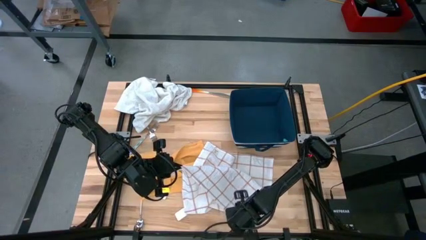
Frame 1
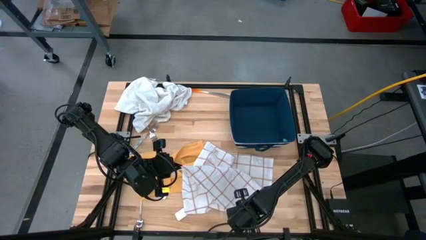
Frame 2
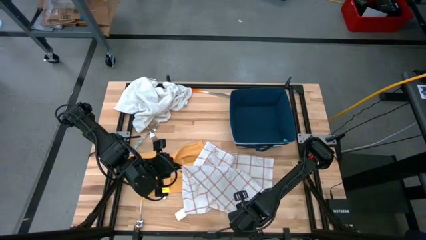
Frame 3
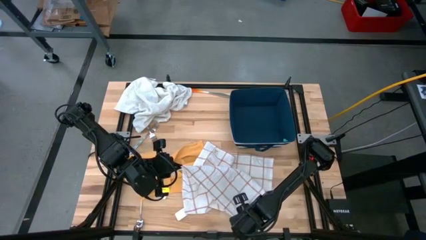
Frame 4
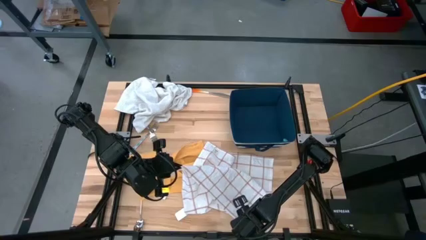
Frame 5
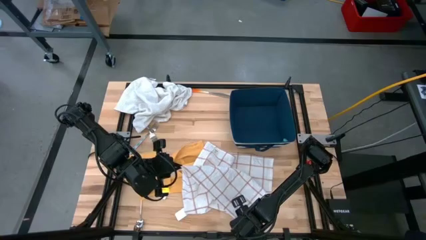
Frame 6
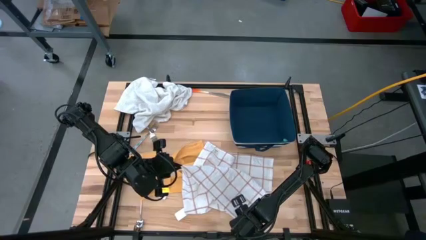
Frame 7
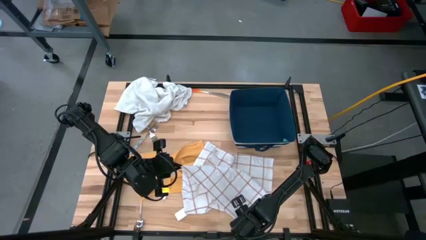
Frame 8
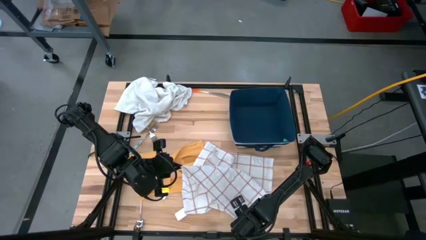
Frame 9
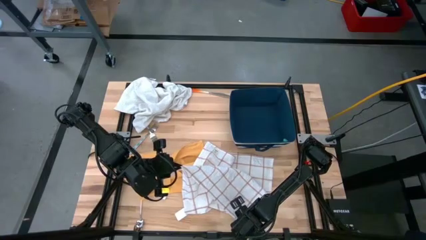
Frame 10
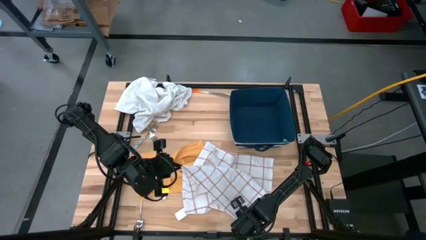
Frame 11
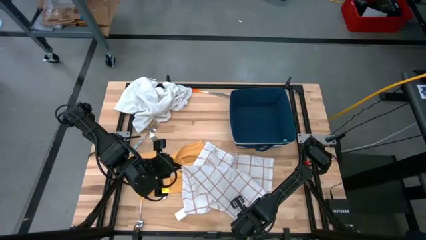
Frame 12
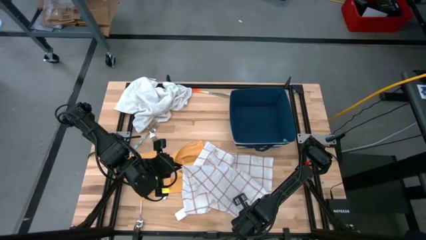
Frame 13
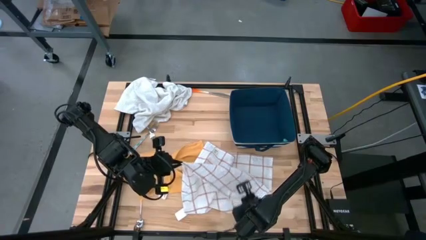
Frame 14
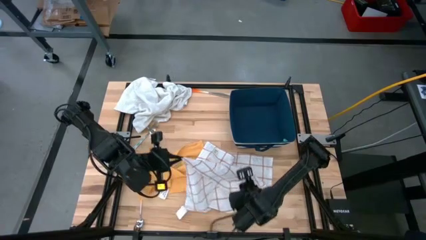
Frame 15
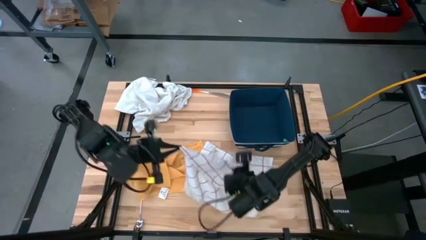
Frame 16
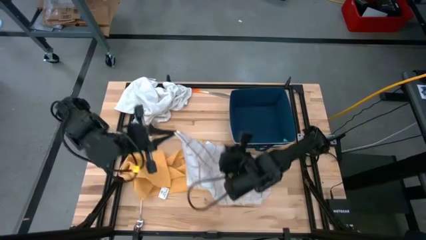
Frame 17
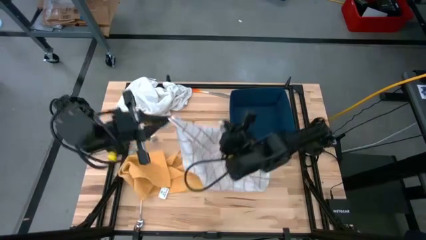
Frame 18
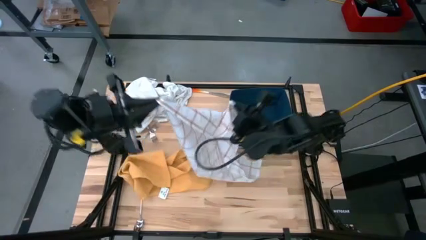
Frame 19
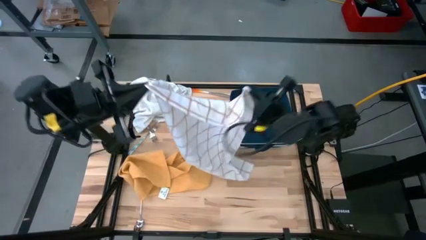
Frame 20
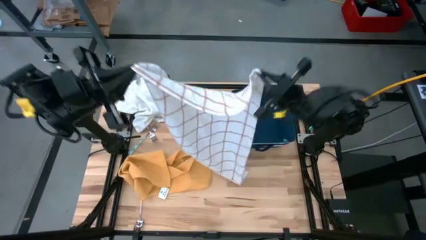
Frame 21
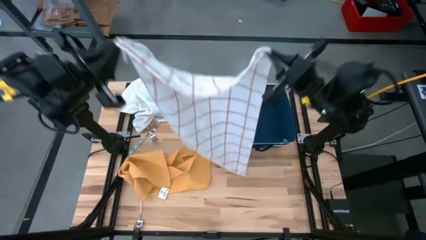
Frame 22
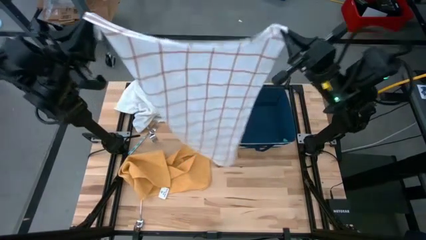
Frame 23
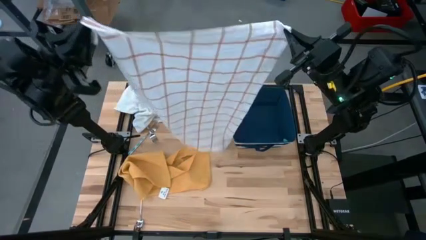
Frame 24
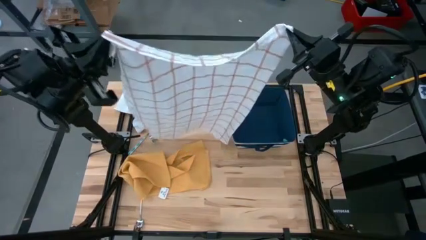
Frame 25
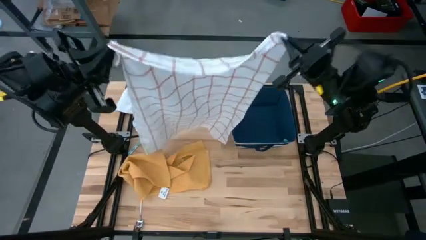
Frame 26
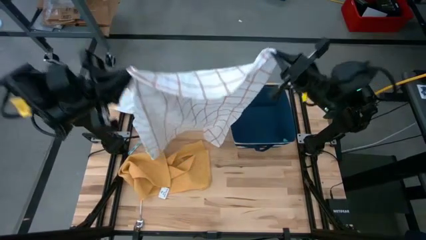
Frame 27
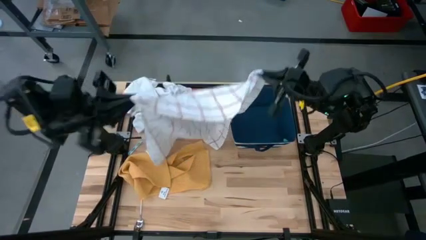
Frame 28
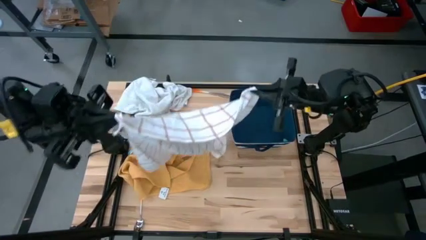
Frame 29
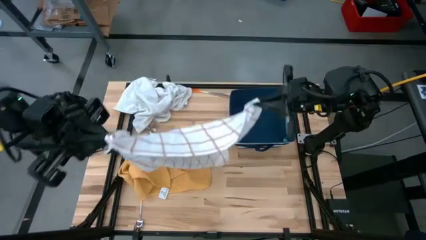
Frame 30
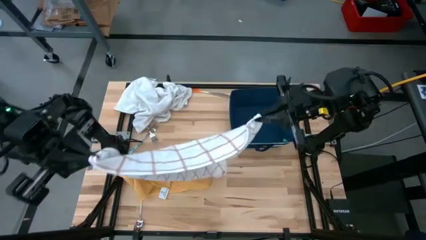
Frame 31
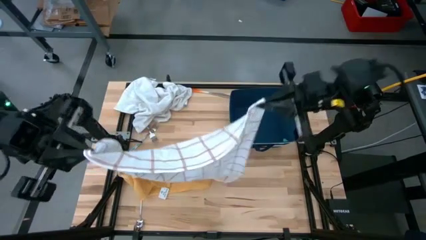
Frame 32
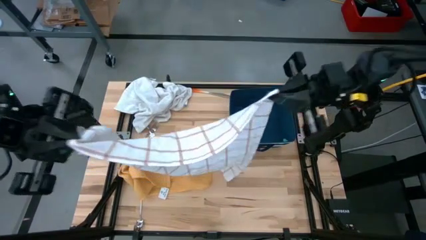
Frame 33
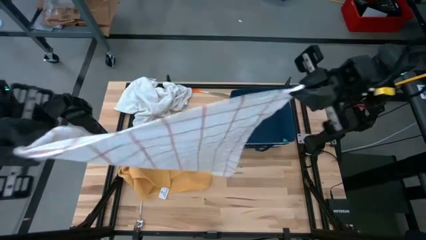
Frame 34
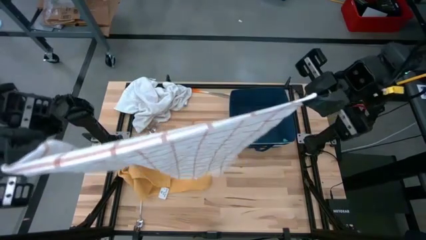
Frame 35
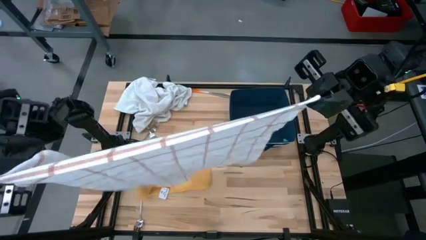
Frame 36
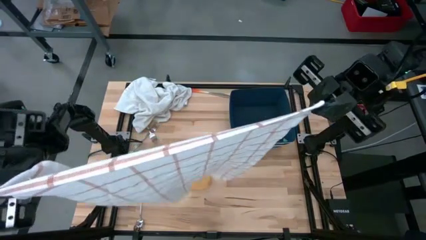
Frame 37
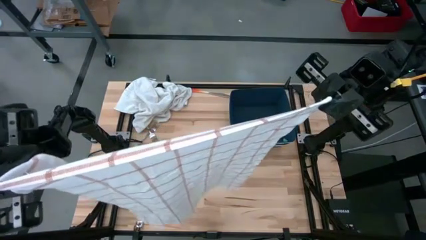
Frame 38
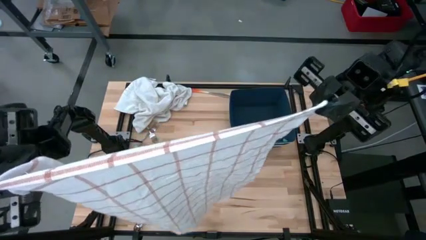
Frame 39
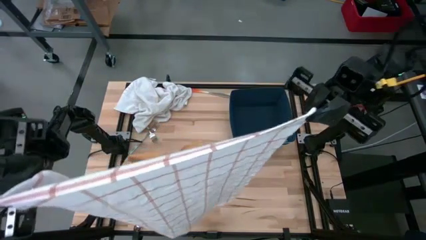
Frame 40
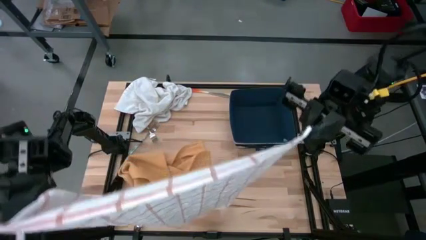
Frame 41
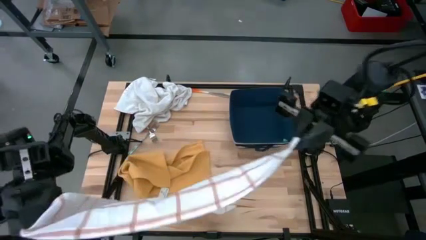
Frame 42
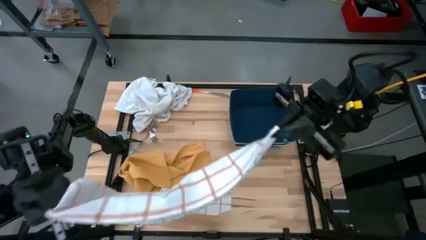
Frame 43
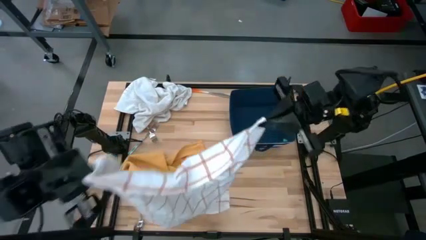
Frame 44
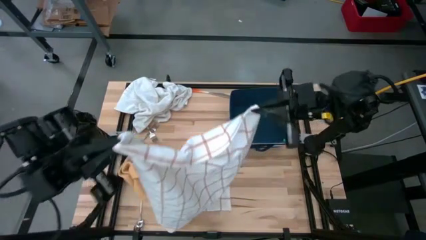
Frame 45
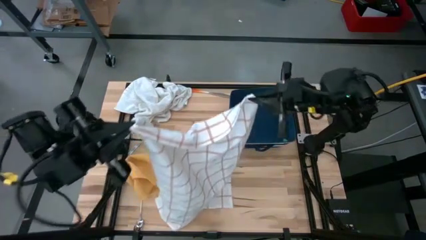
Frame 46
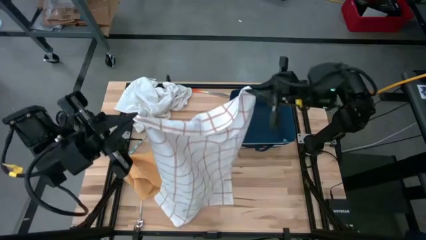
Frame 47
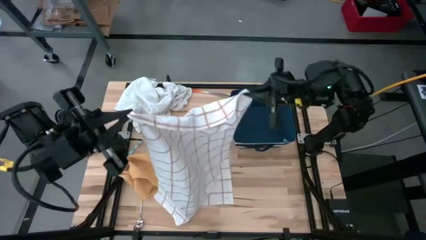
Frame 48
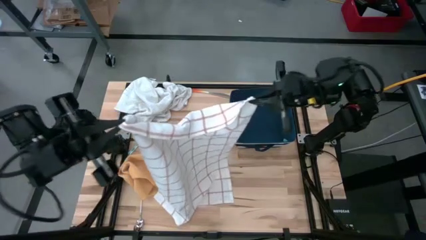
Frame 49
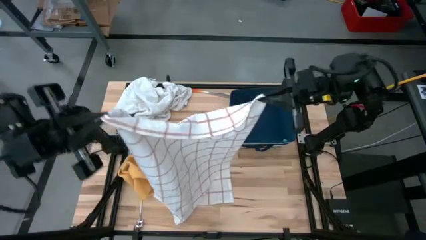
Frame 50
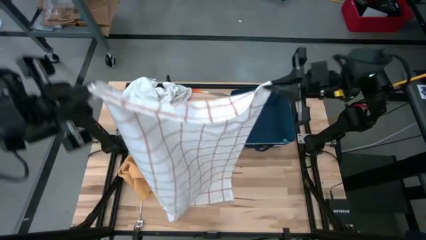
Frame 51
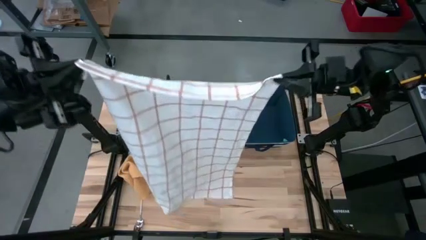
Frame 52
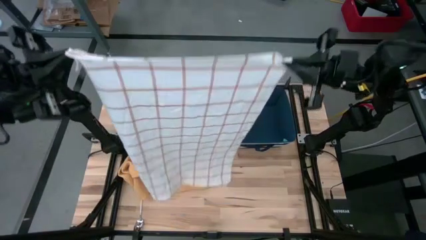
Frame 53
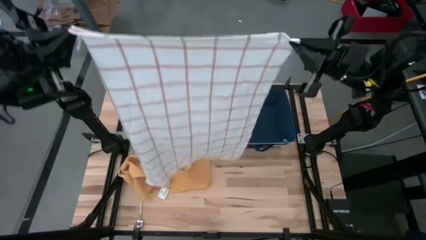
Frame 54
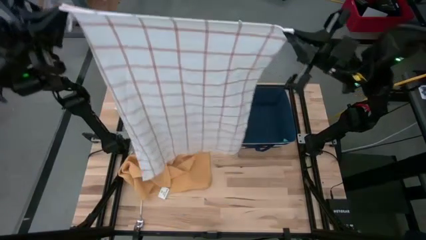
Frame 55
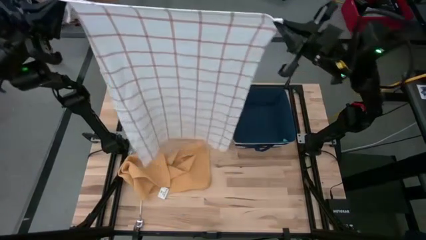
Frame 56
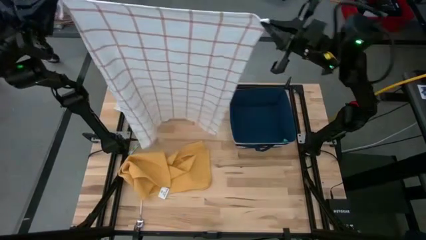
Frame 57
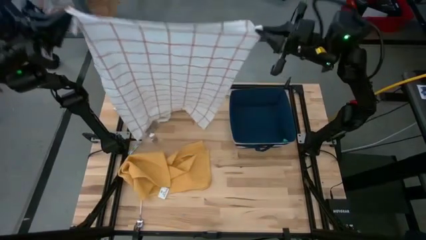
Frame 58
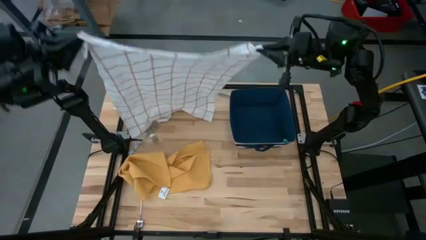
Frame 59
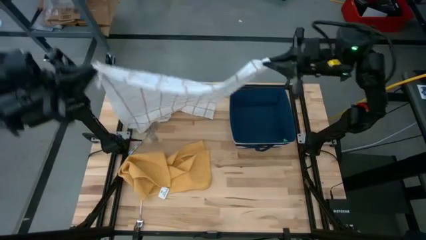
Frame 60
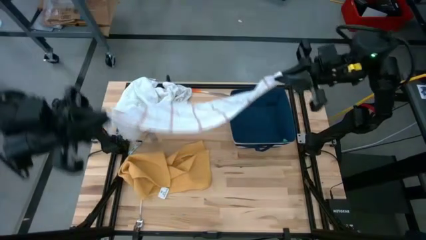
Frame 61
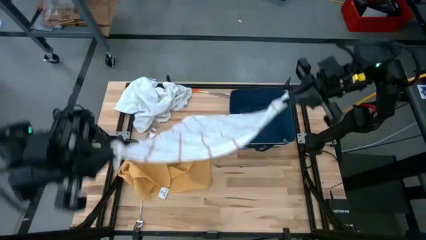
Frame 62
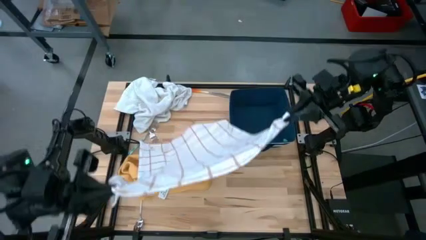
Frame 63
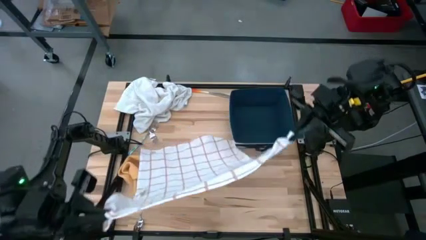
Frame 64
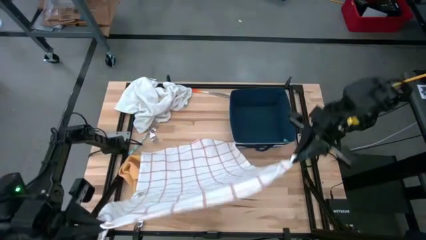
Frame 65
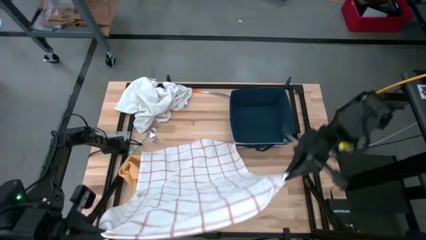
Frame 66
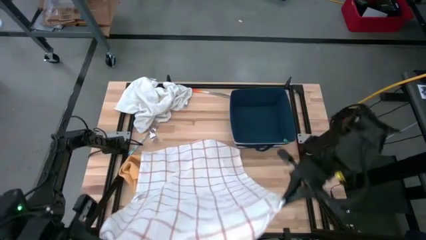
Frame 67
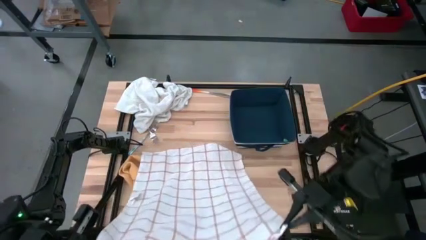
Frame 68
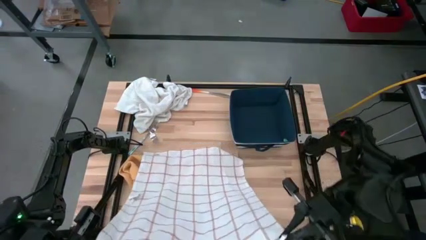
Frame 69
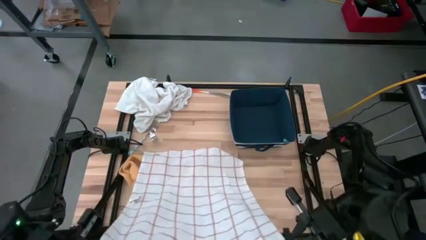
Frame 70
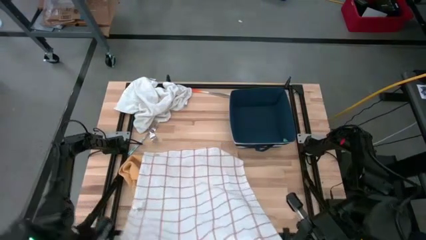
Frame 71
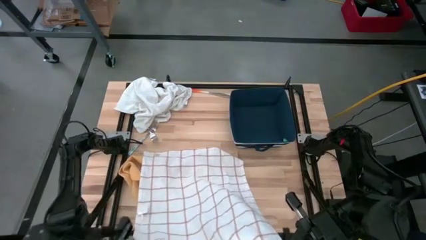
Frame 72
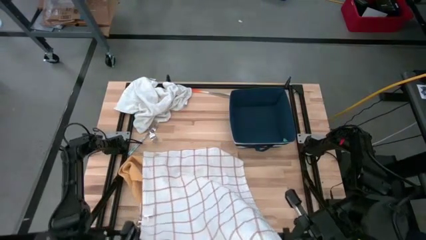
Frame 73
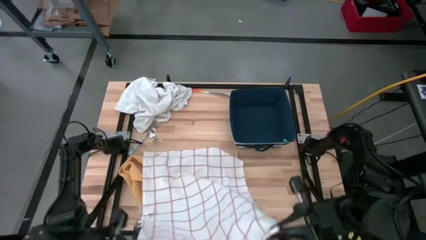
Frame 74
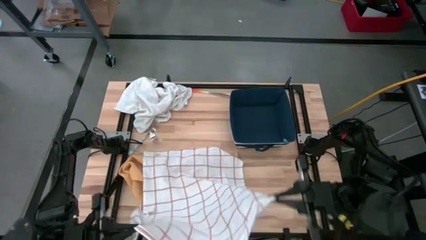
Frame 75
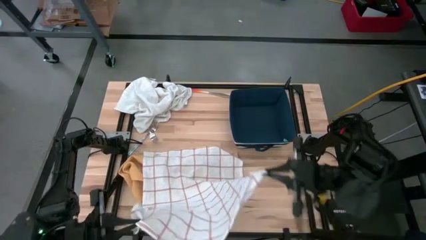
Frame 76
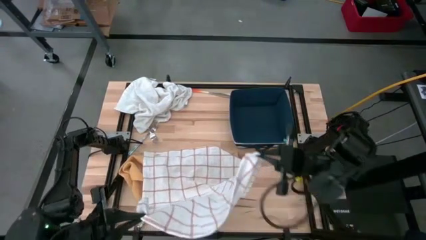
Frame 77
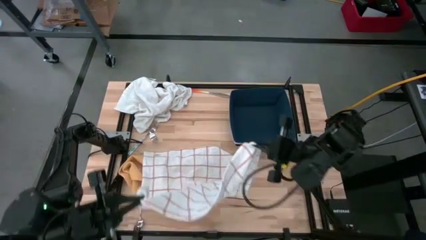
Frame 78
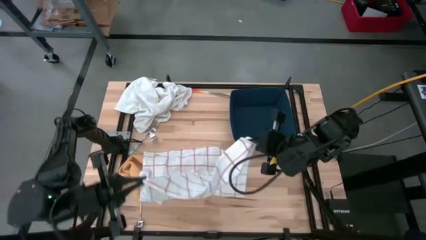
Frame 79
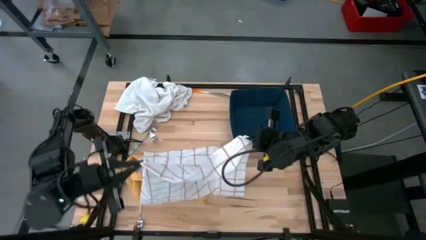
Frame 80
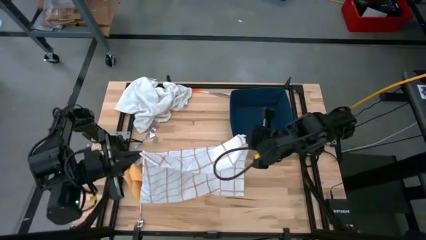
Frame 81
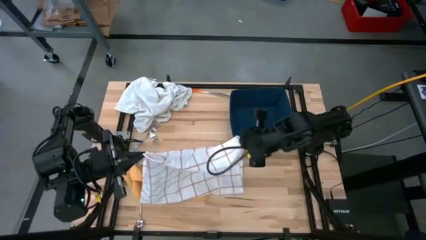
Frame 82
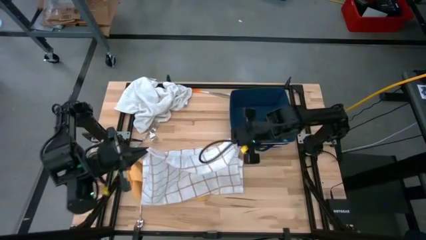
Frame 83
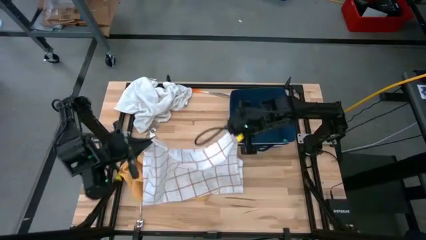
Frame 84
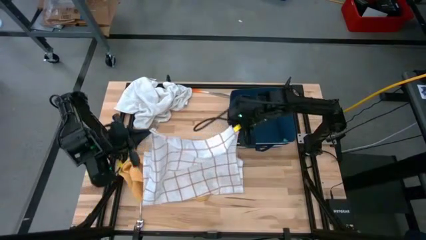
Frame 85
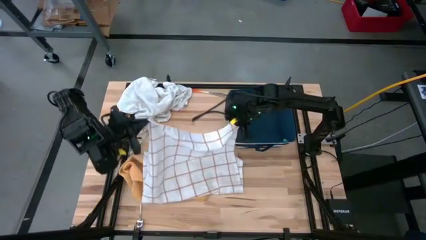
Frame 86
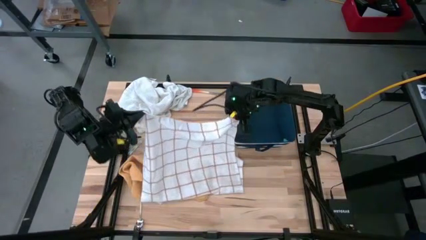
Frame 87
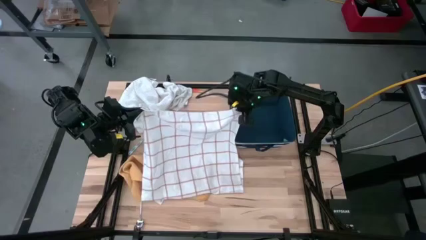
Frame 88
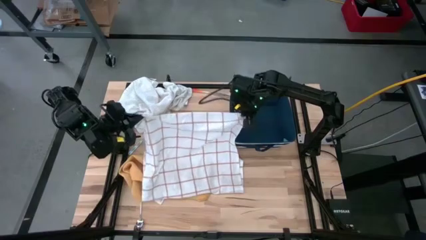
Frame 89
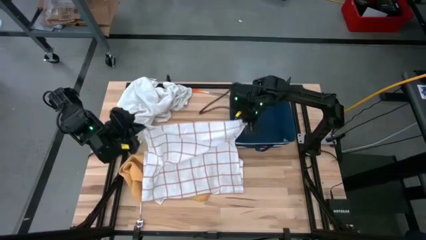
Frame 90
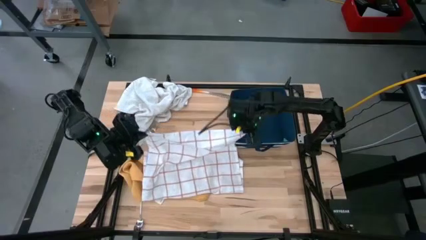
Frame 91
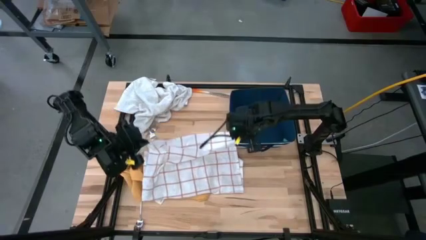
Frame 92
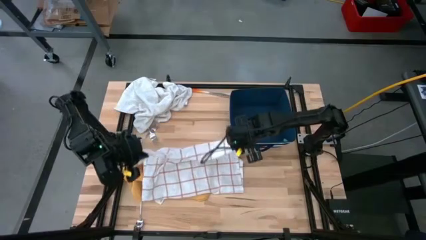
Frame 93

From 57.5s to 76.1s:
Task: Fold towel
Fold the white-and-brown checkered towel
